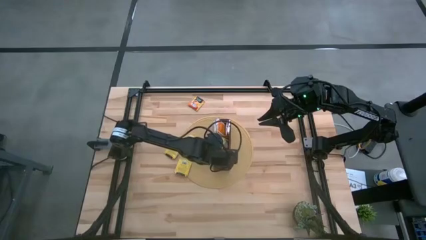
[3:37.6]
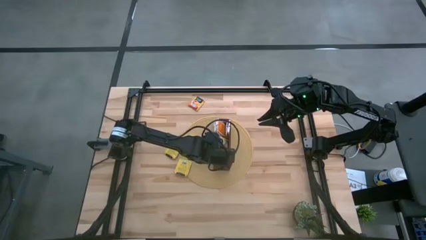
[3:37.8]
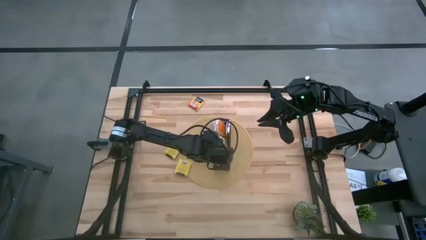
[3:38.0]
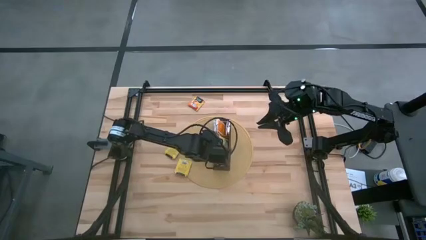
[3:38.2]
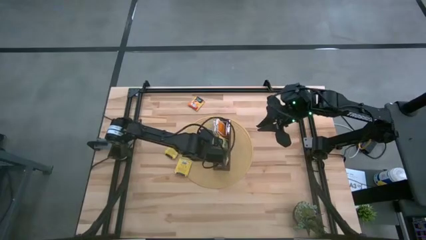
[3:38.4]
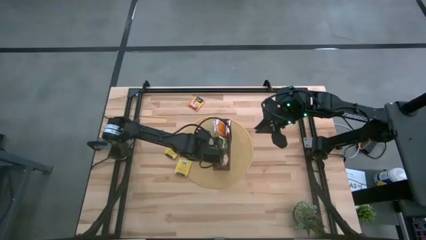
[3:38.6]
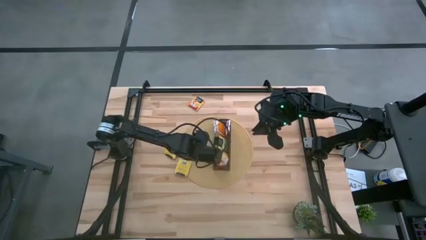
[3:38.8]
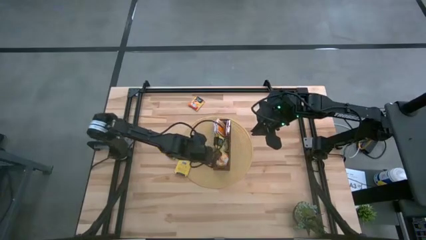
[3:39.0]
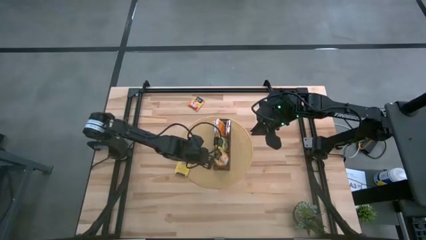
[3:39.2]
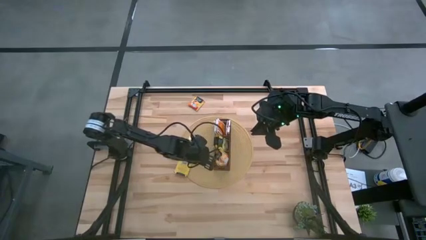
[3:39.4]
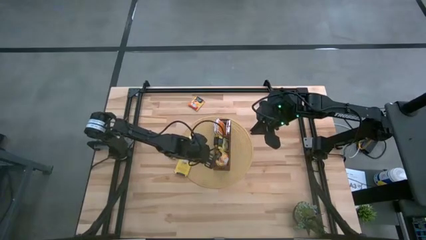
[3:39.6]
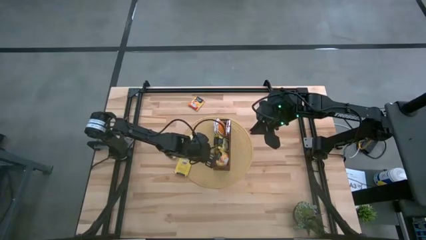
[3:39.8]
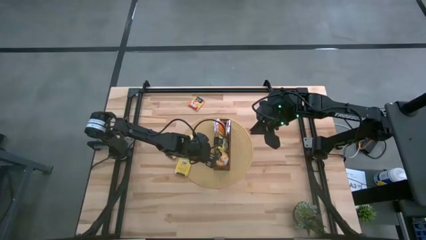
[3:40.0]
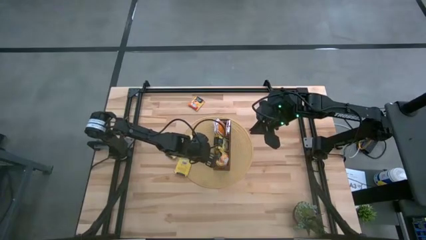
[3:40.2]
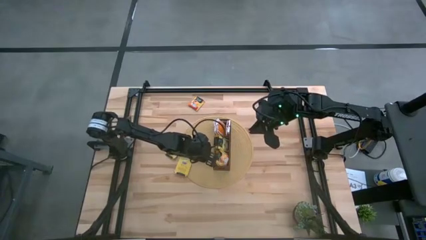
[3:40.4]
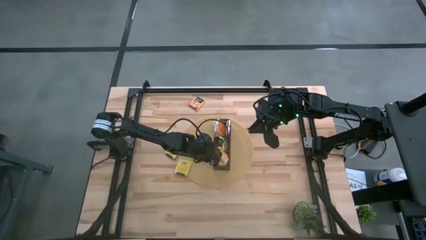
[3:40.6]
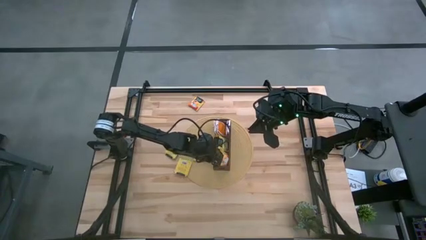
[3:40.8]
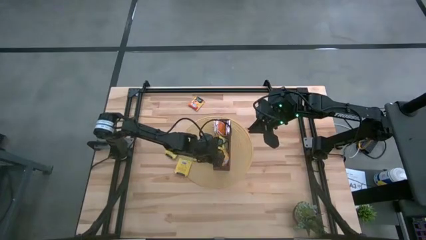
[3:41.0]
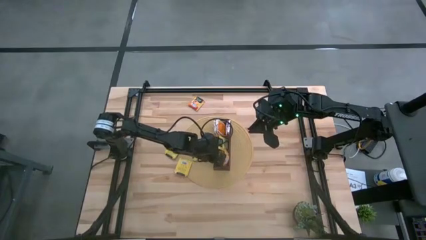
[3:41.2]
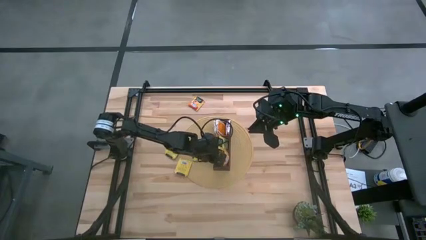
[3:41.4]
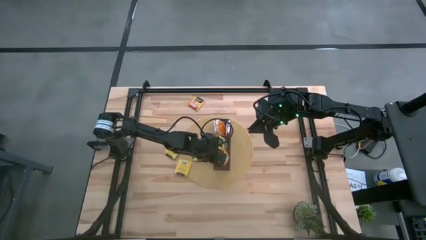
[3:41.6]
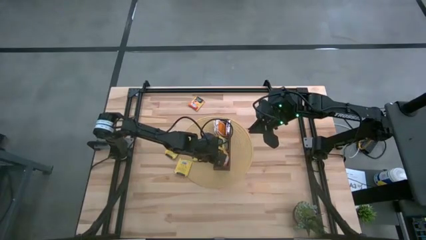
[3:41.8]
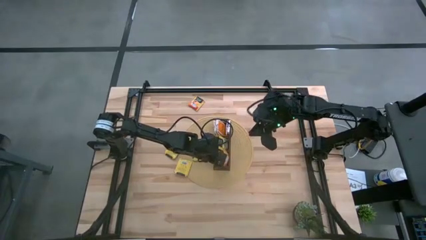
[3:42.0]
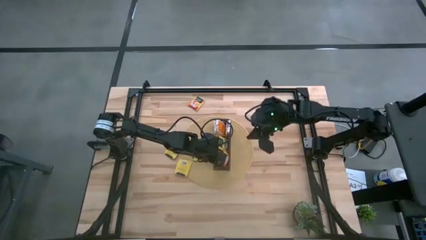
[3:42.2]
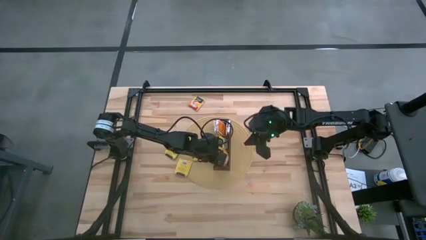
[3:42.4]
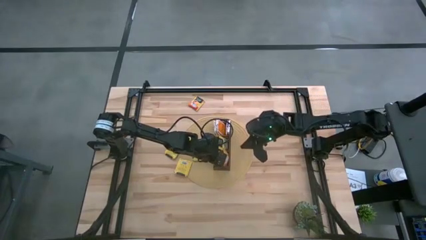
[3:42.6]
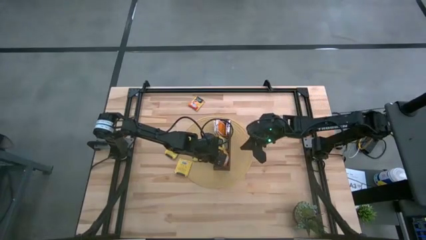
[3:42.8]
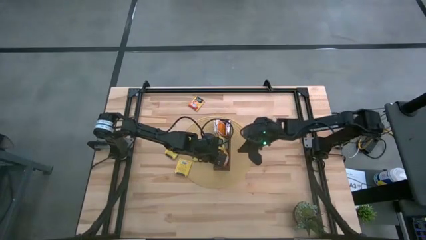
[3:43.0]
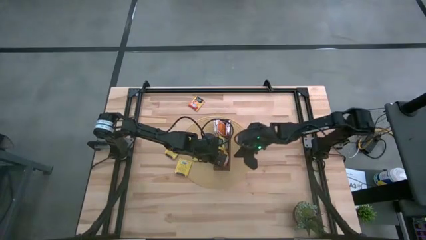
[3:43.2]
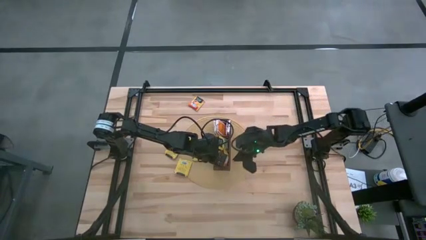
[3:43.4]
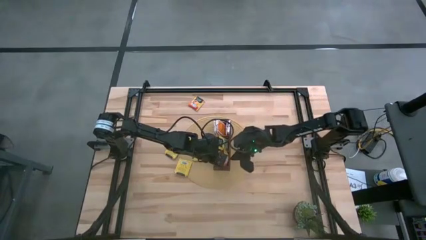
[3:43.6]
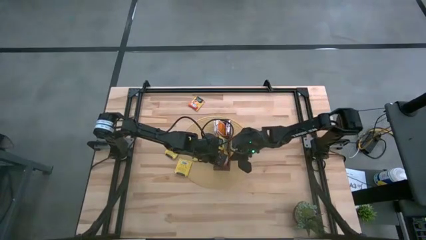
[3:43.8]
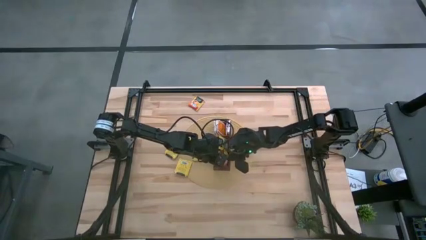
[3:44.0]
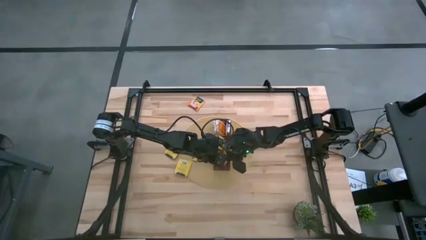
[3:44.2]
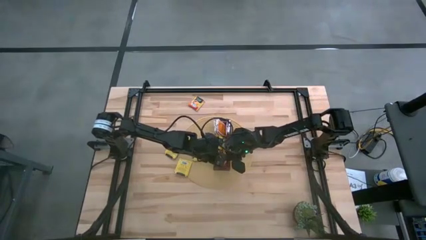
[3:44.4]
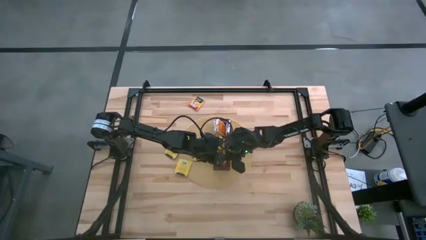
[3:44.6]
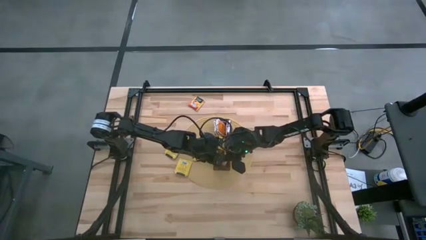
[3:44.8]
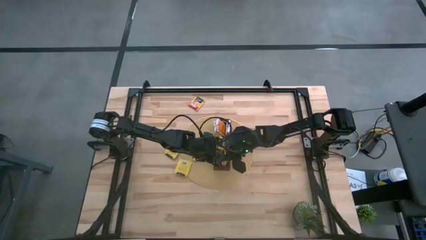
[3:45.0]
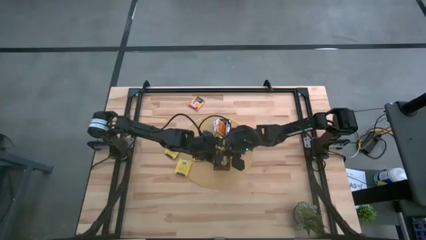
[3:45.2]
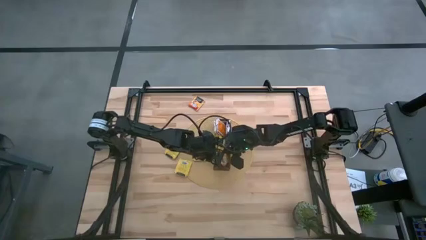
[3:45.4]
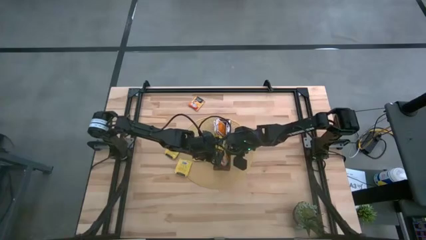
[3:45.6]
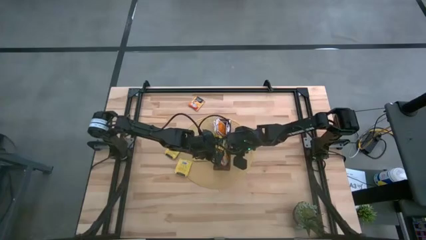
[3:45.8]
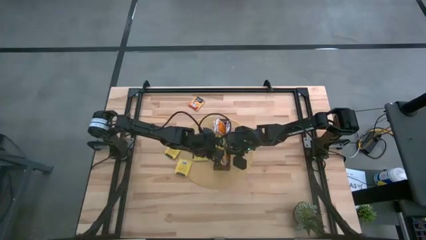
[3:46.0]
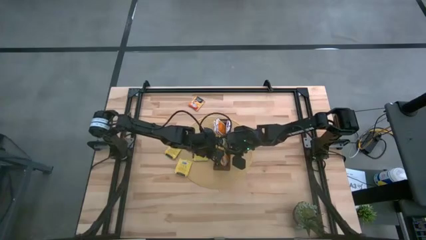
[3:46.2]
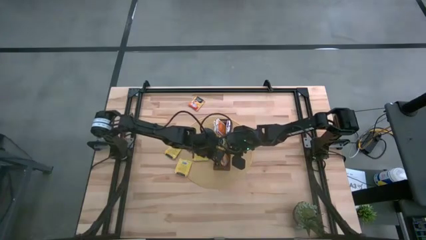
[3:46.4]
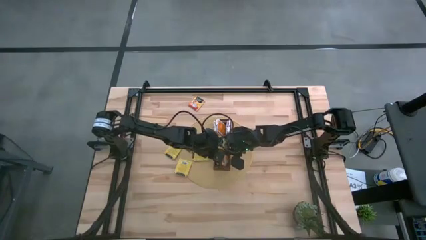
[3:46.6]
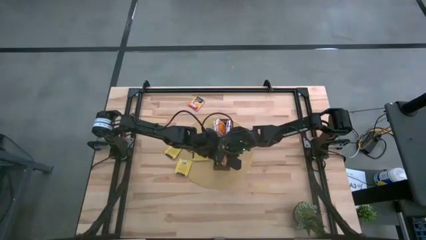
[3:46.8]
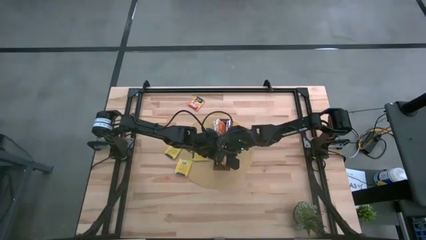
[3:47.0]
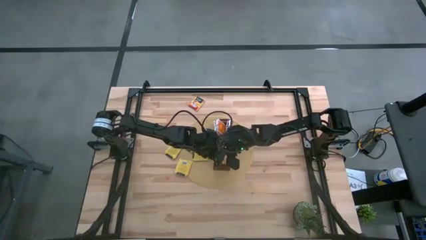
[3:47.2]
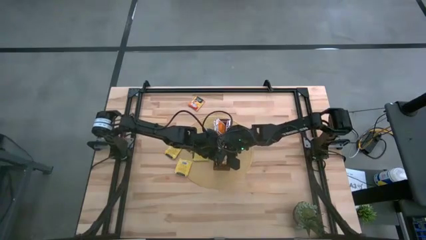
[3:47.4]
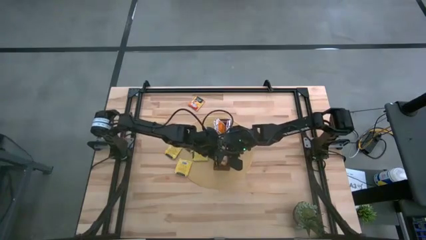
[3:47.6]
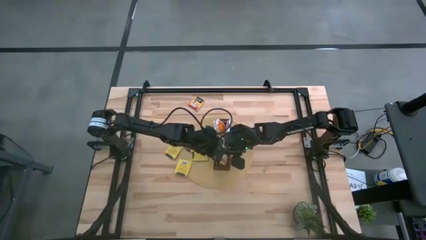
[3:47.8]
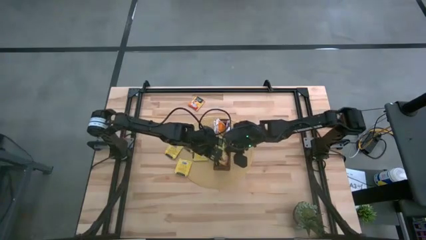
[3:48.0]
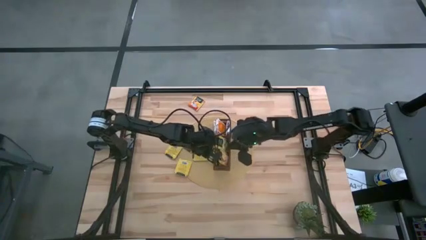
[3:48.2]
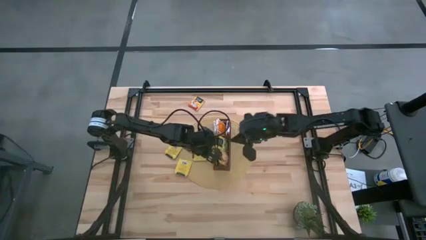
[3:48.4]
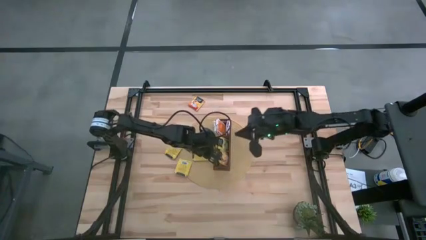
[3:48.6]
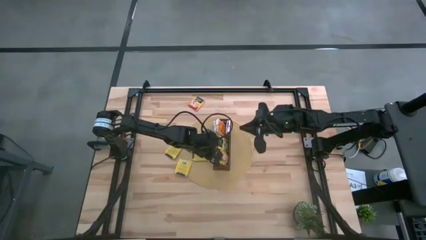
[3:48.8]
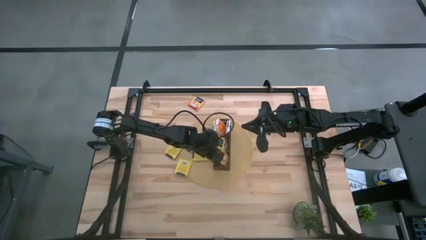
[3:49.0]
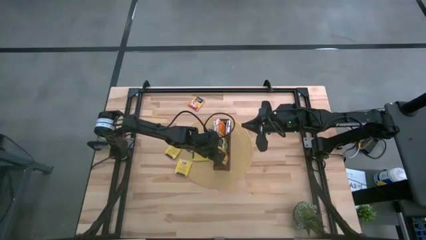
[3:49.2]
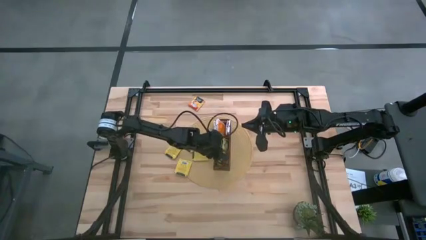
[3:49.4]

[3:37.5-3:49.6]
Task: Pick & Place Tea
Adjust the orange tea bags in the wooden organizer

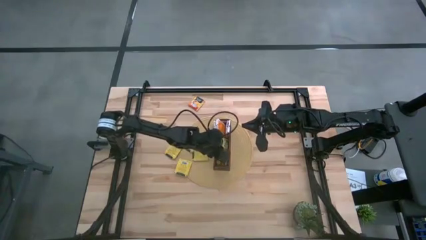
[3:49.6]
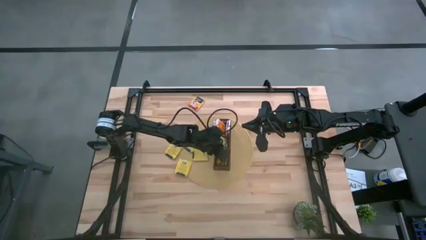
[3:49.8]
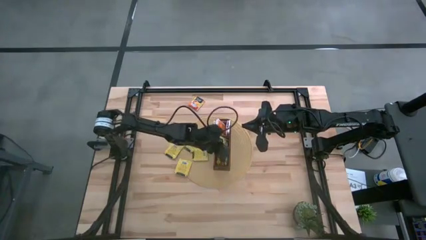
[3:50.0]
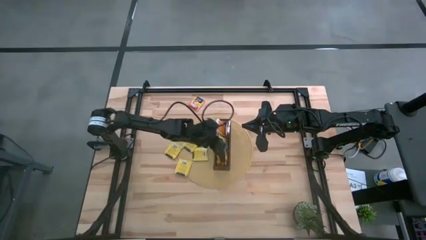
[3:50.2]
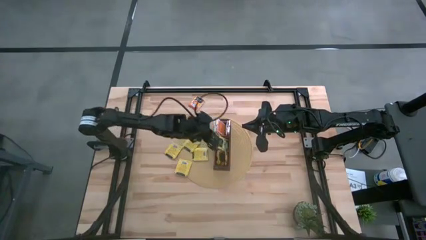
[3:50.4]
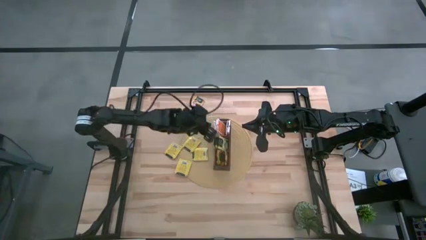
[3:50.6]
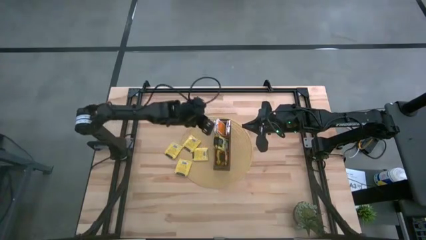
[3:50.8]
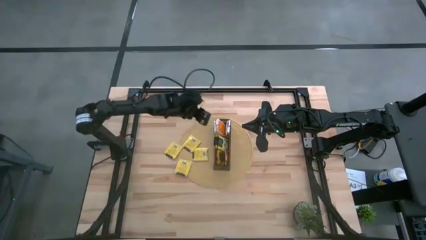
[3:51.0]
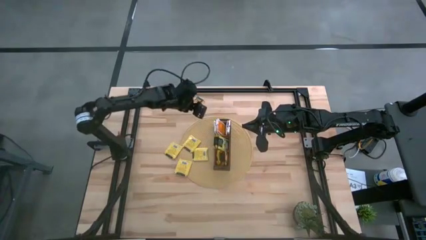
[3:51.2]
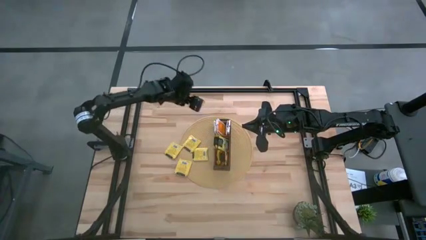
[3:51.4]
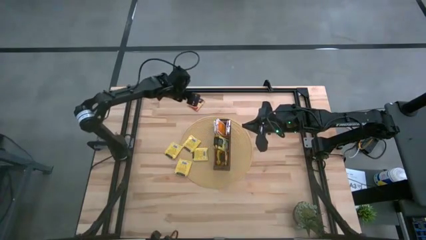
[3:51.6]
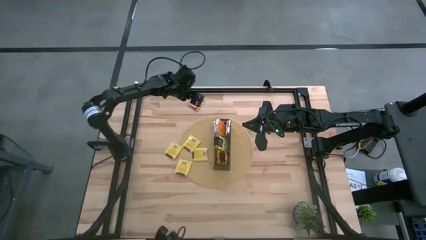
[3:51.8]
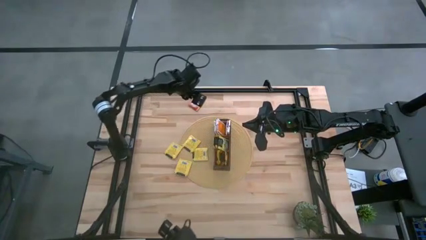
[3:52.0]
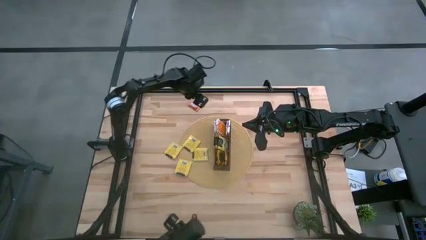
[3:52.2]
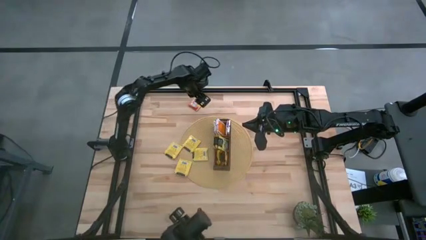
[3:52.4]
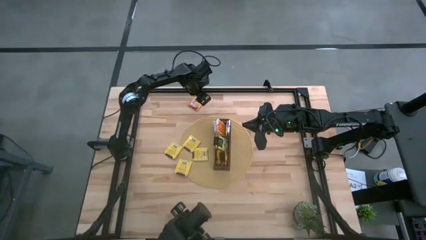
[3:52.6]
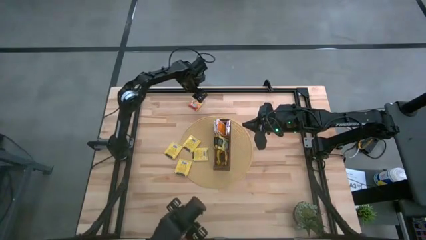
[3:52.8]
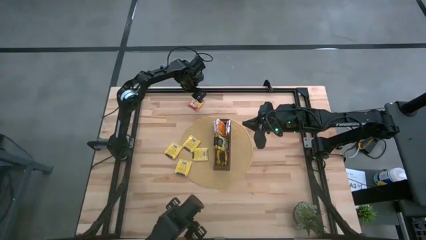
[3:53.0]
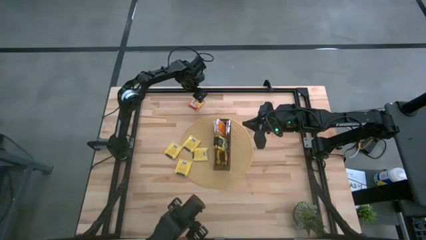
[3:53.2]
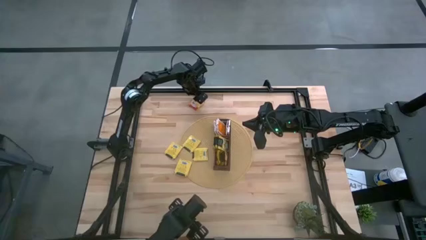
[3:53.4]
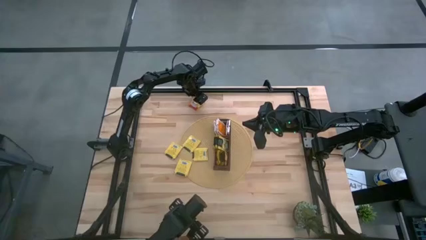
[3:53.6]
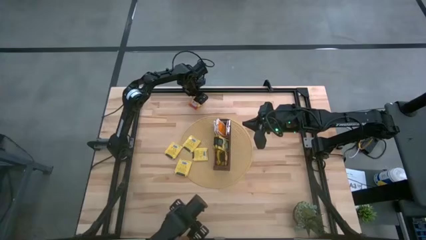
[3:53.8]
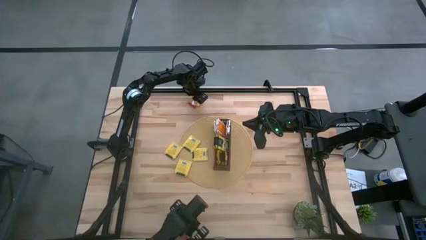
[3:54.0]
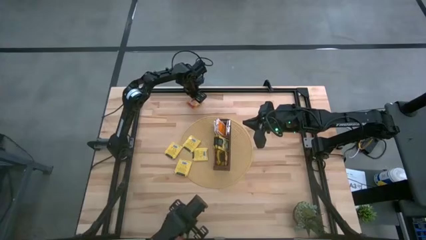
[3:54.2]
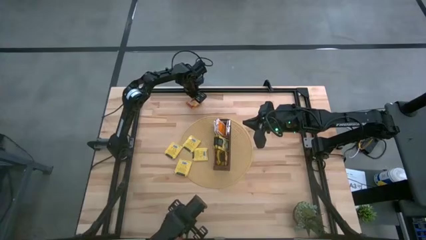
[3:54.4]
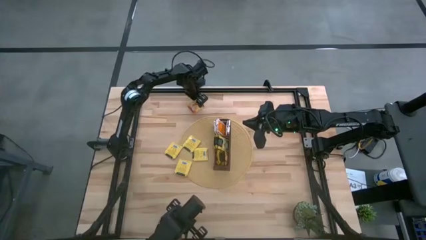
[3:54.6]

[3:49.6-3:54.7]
Put the orange tea bag into the bottom section of the wooden organizer
